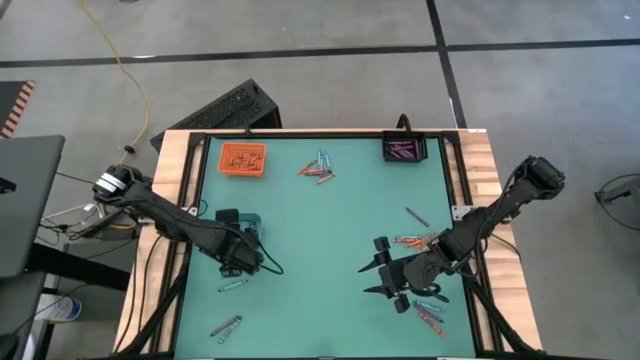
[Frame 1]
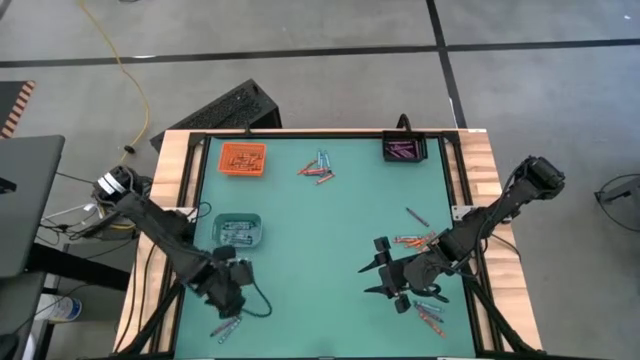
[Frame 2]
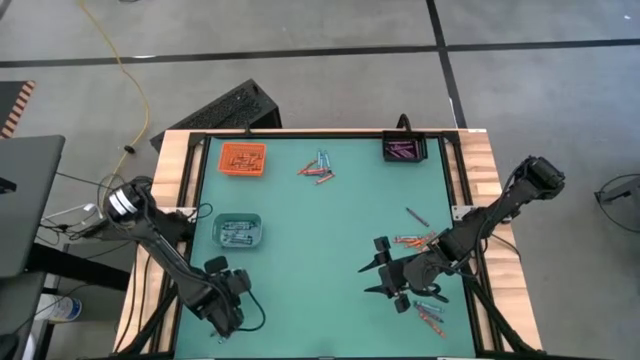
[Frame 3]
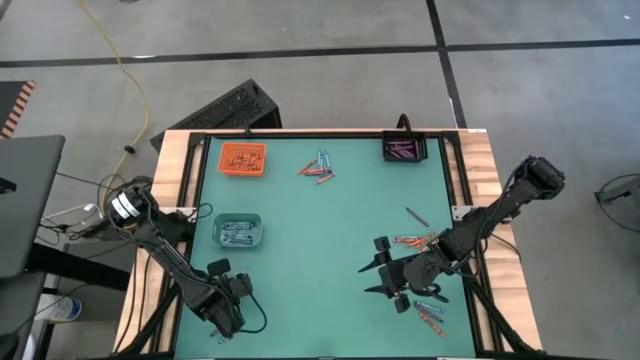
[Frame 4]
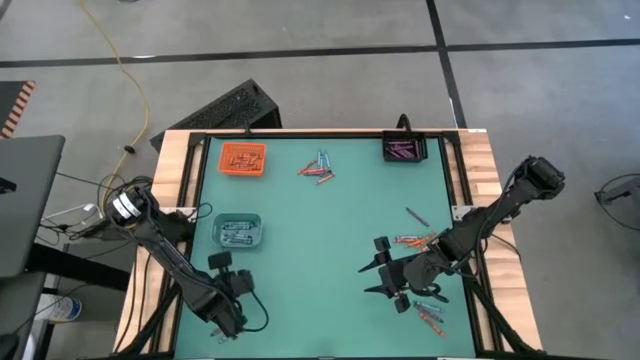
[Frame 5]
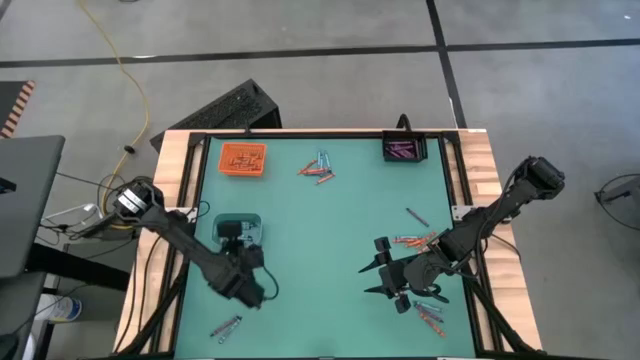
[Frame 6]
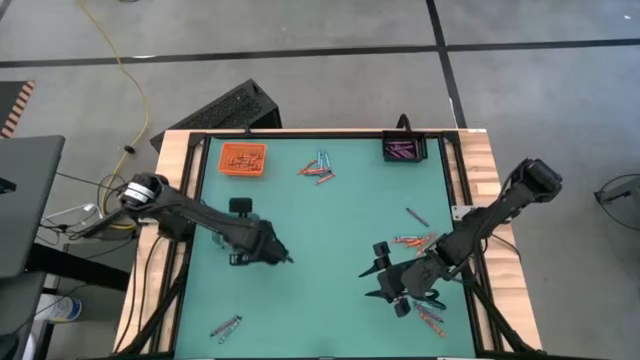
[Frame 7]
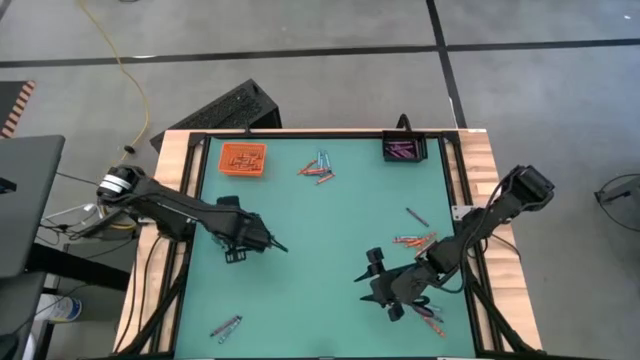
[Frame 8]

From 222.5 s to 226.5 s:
Task: Sort crayons
Put the blue crayon into the blue bin

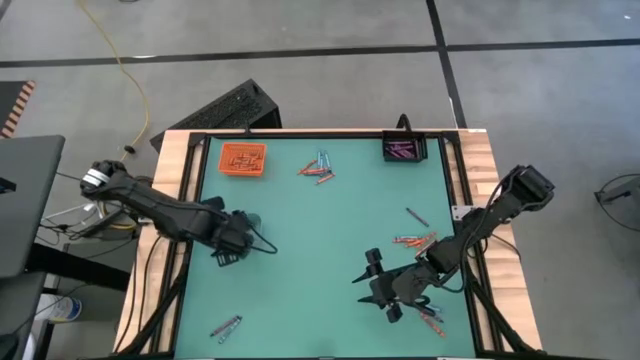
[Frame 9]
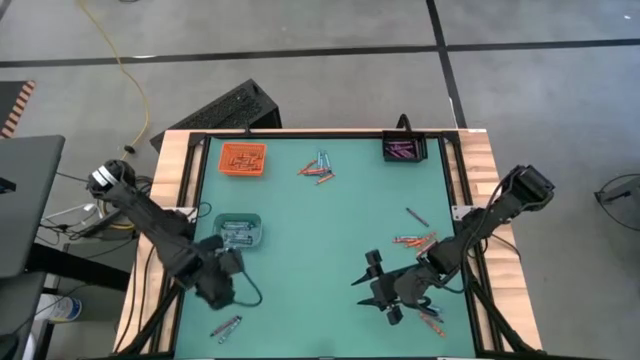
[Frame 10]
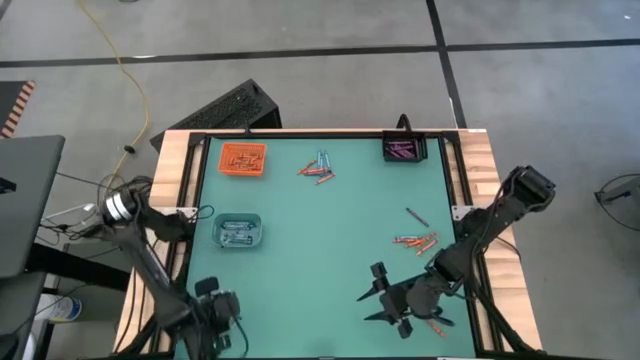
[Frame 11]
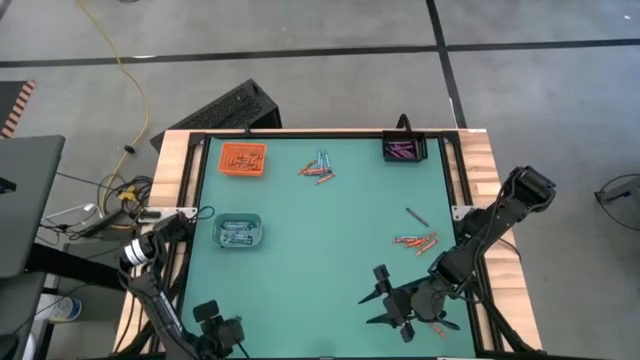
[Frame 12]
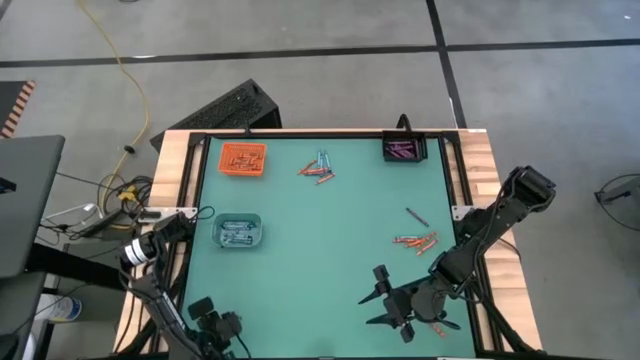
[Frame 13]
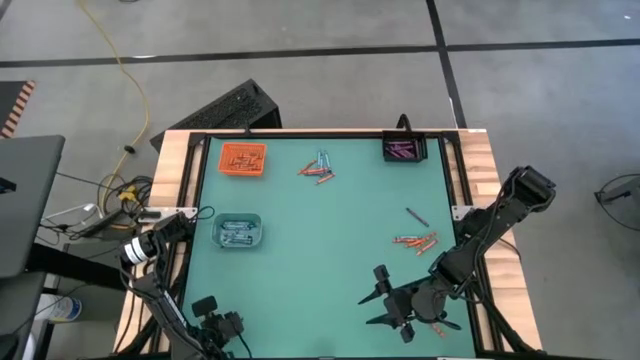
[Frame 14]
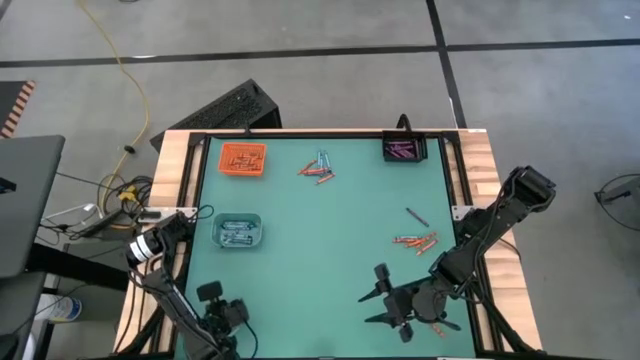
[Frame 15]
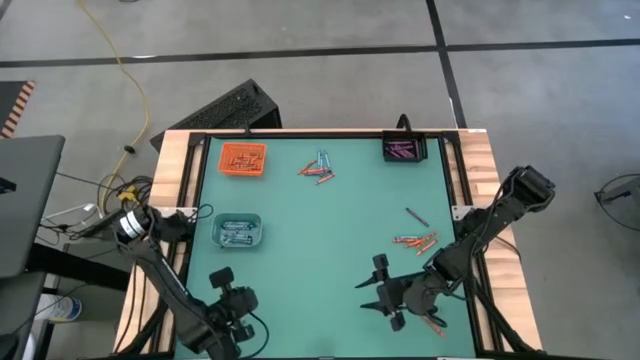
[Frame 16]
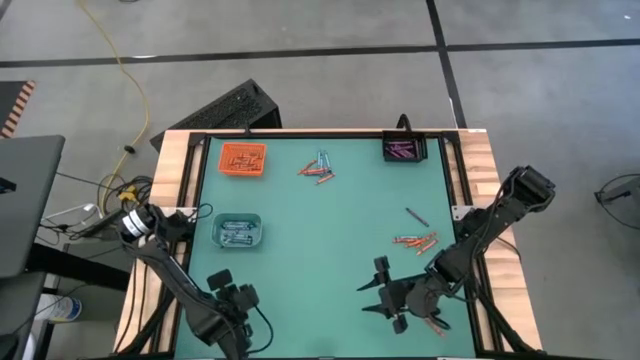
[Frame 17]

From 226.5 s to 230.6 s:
Put the purple crayon into the black basket

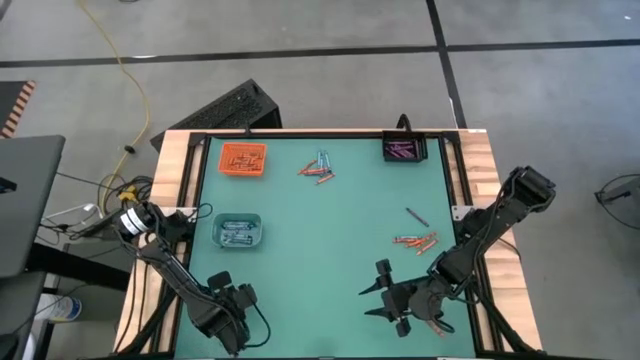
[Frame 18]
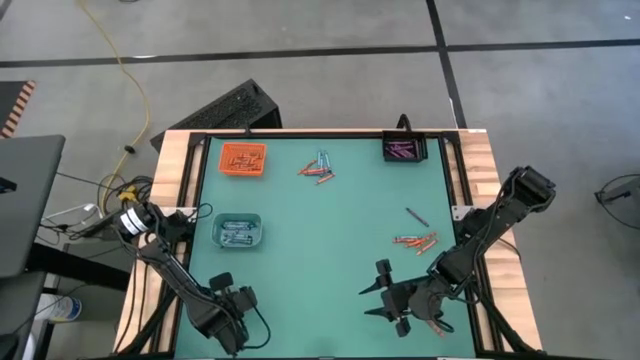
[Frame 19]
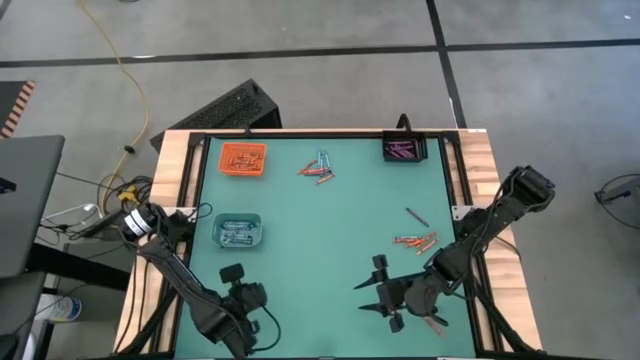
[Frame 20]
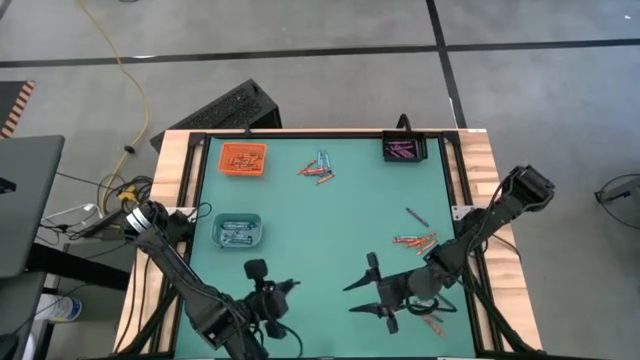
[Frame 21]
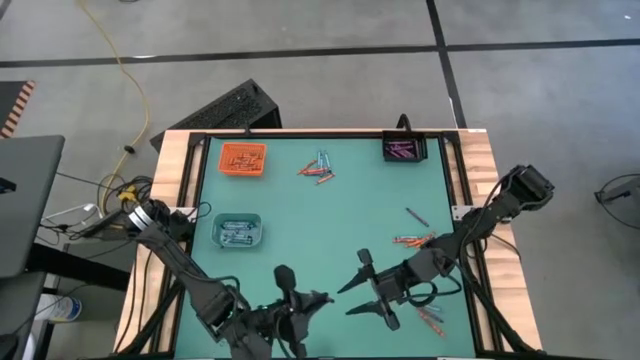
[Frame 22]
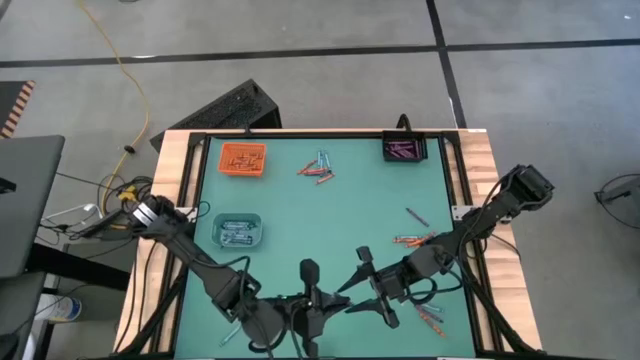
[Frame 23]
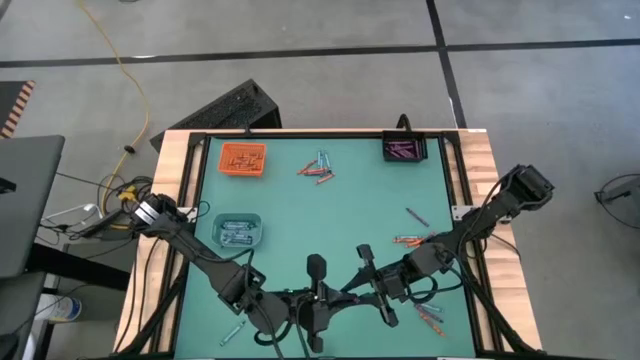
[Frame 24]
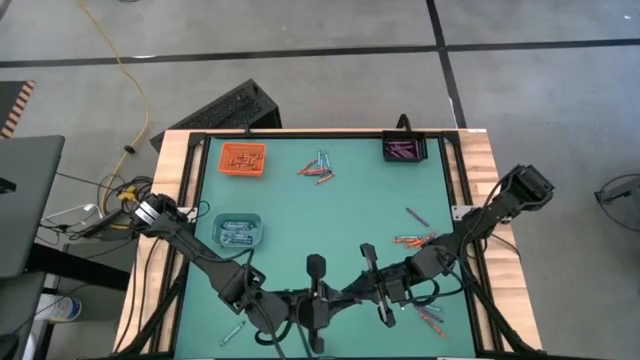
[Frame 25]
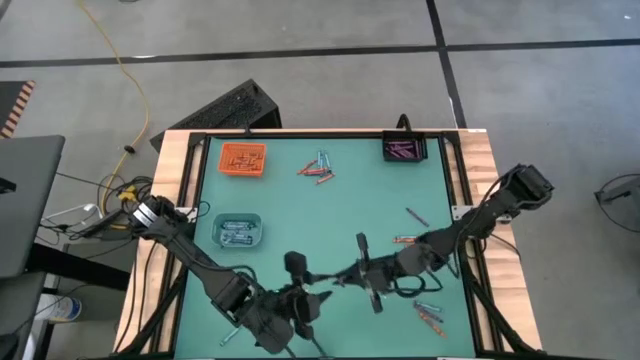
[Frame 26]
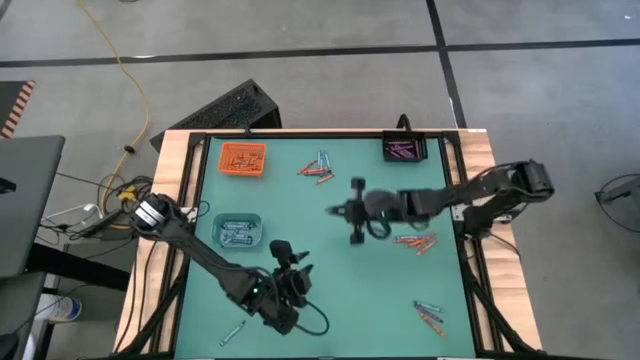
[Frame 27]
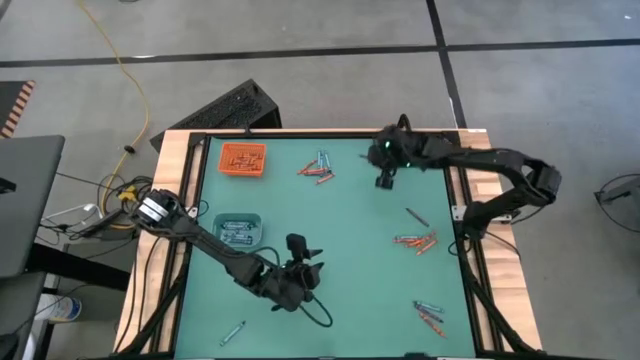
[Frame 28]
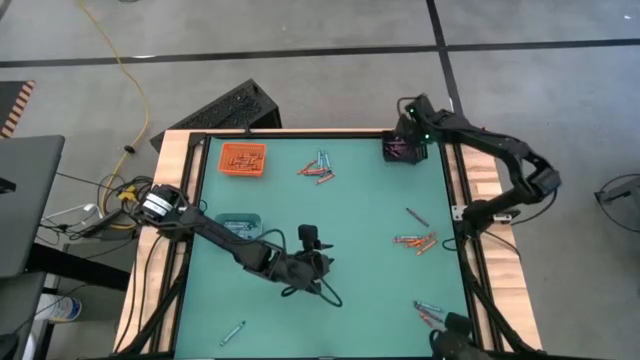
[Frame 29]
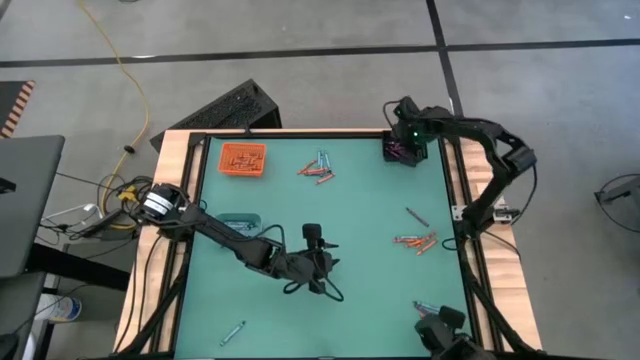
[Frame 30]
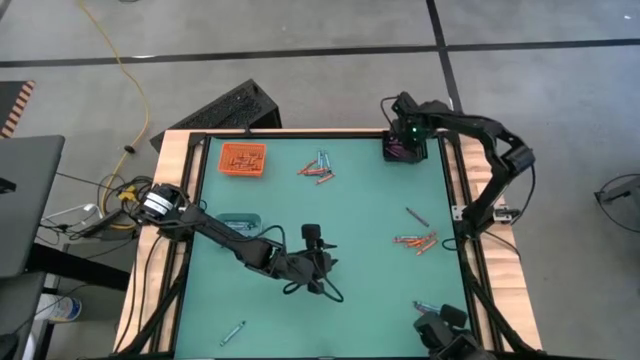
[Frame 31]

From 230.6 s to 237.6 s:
Put the purple crayon into the black basket

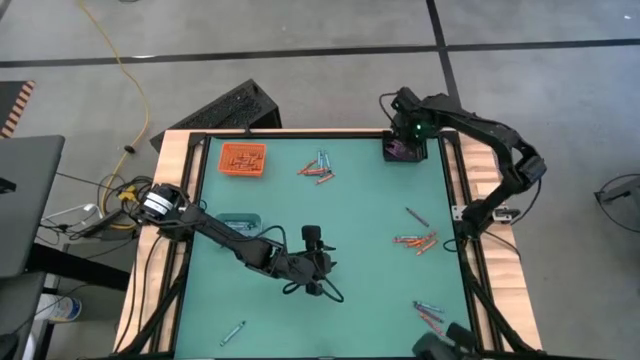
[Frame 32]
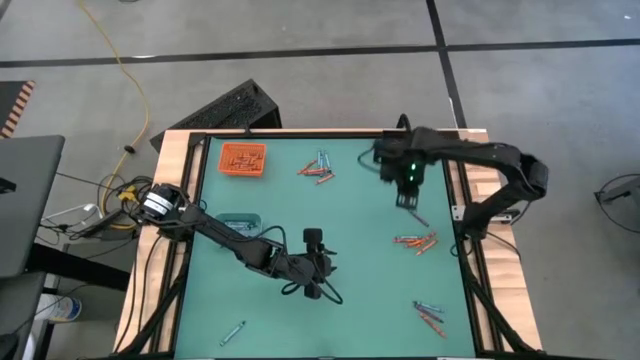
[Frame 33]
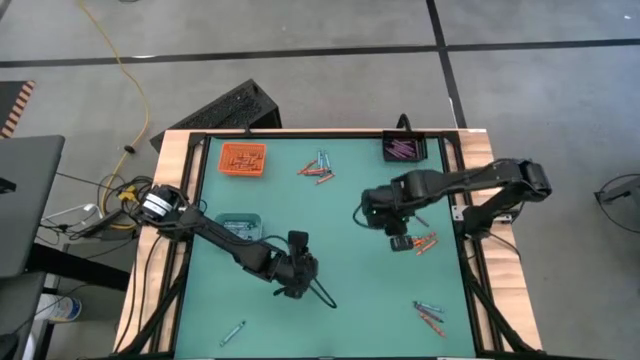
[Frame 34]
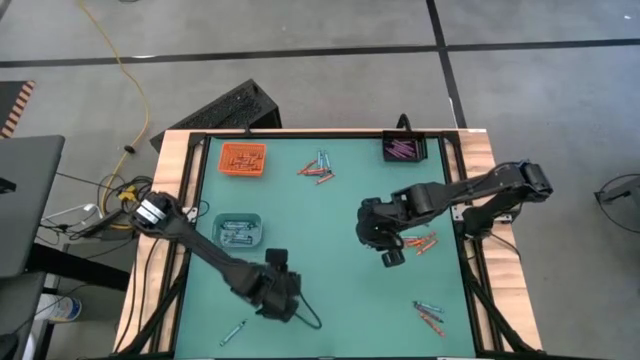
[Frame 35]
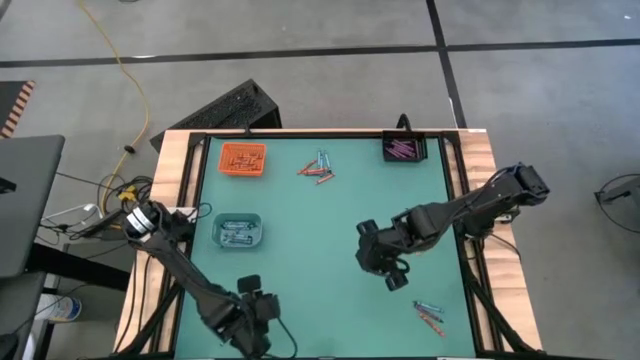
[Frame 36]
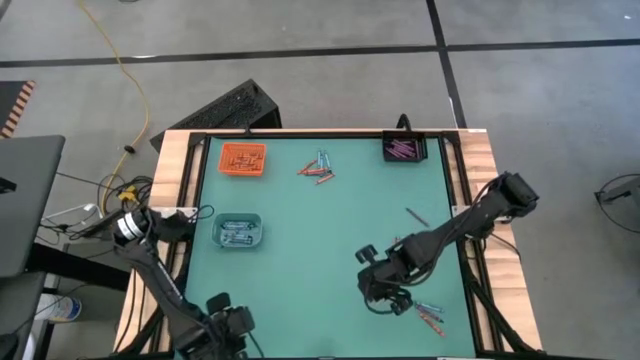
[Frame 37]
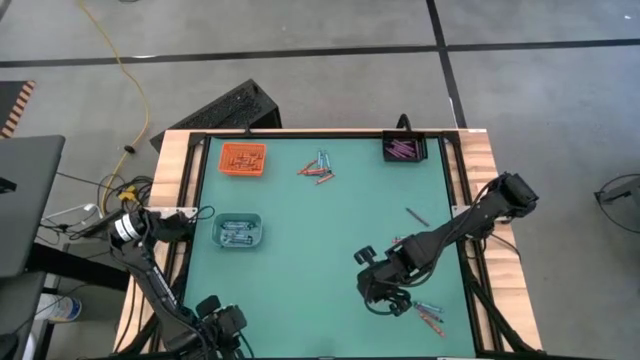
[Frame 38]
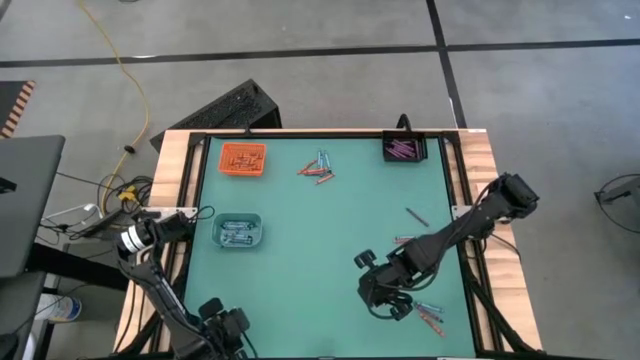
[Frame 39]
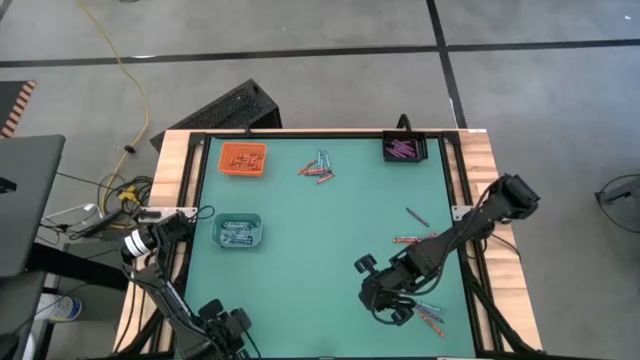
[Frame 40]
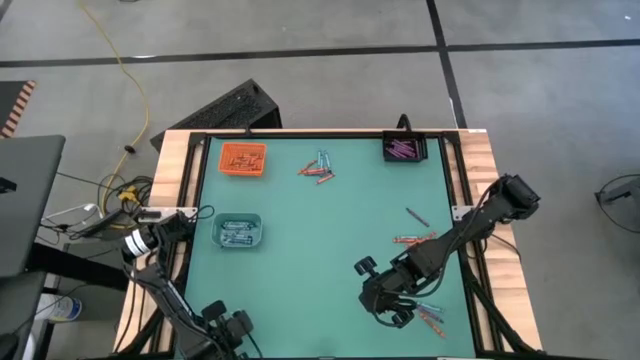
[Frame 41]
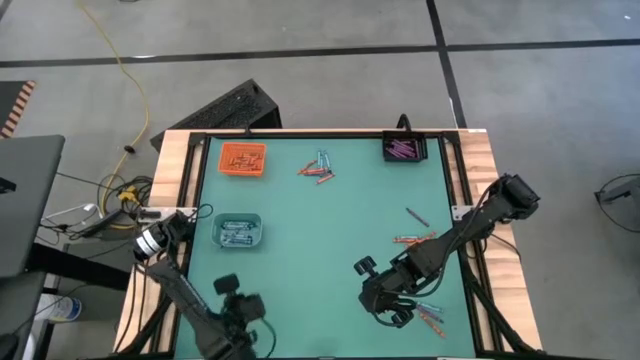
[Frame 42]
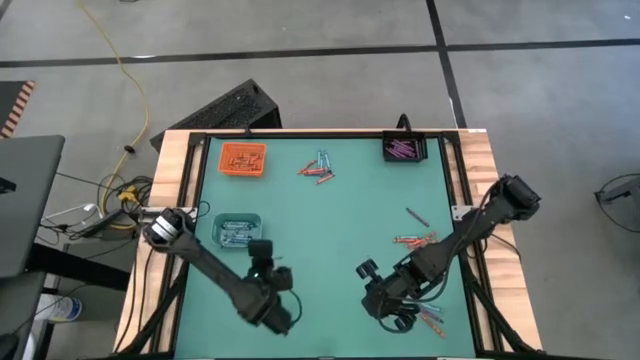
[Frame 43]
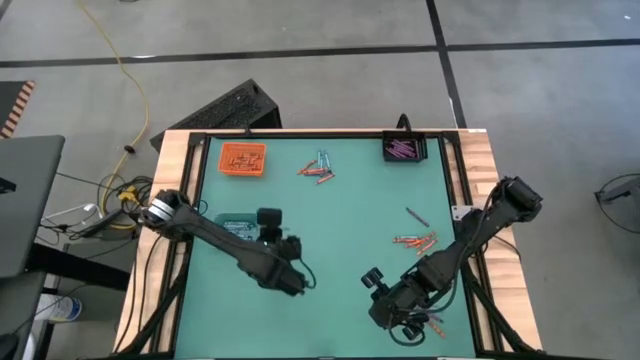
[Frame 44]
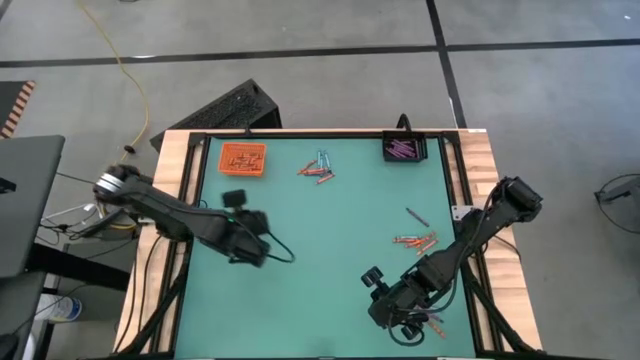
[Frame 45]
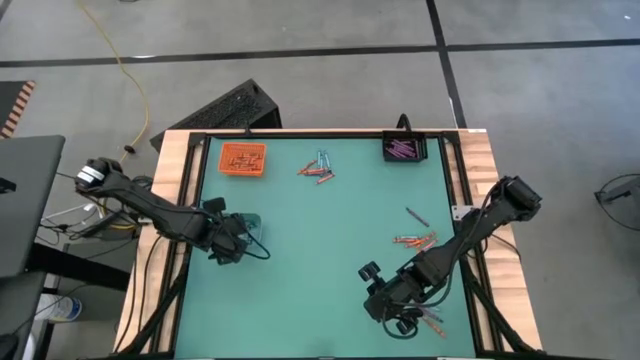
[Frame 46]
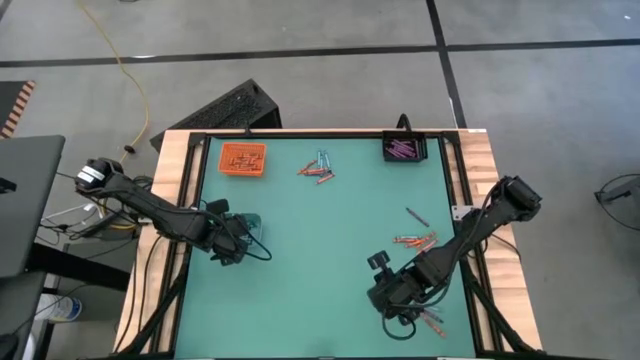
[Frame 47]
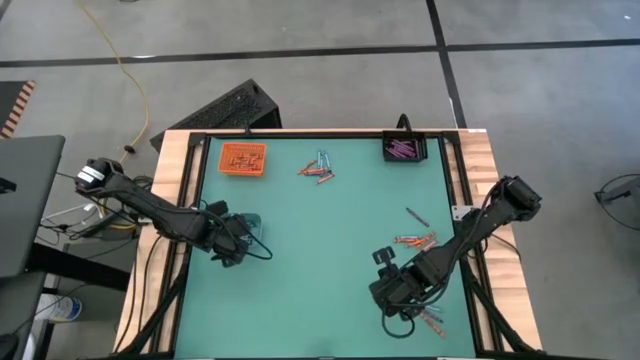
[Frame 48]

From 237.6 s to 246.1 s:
Put the blue crayon into the blue bin
